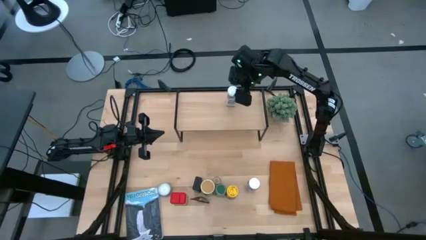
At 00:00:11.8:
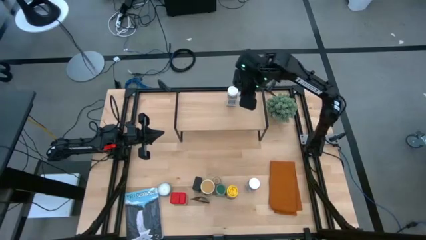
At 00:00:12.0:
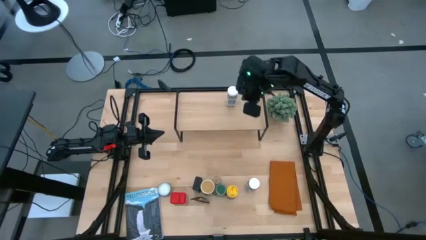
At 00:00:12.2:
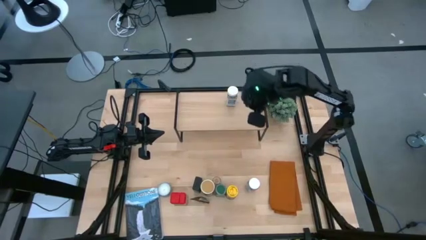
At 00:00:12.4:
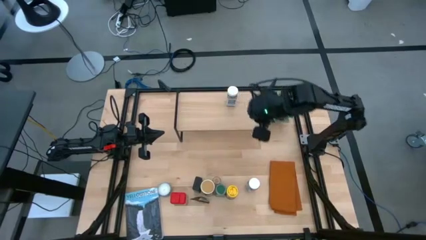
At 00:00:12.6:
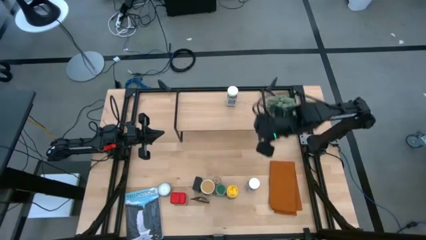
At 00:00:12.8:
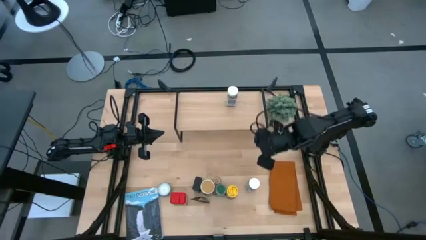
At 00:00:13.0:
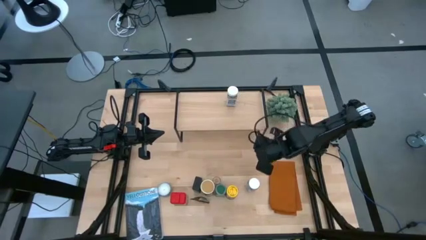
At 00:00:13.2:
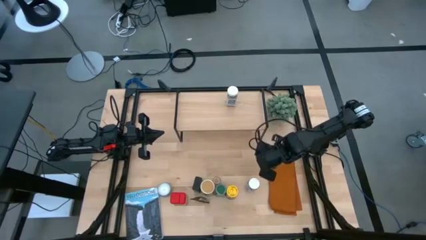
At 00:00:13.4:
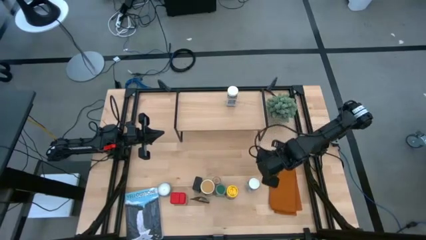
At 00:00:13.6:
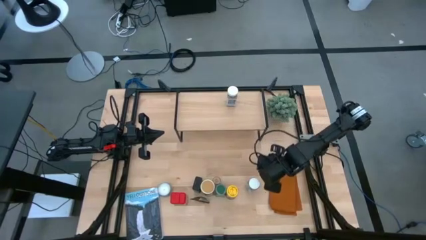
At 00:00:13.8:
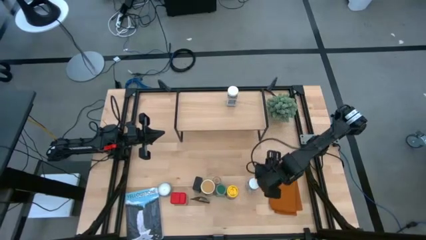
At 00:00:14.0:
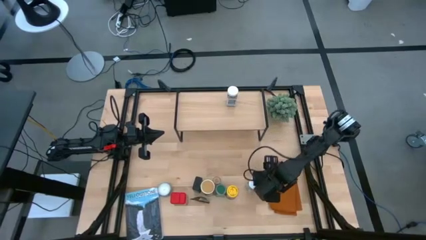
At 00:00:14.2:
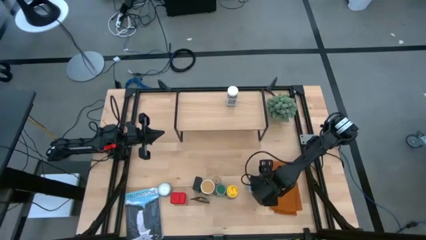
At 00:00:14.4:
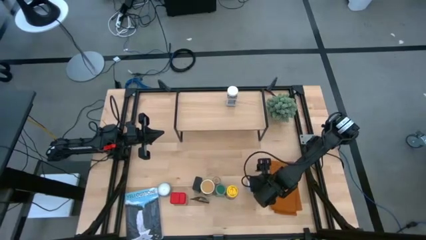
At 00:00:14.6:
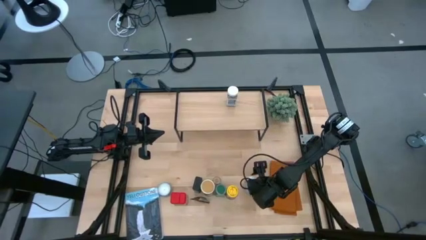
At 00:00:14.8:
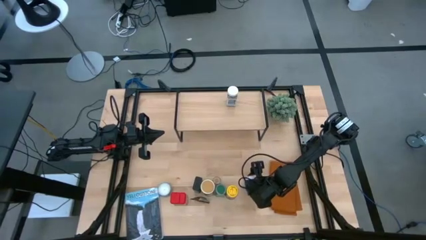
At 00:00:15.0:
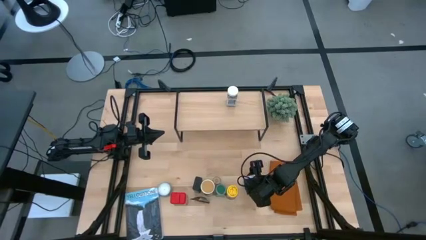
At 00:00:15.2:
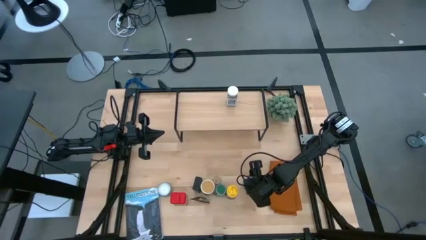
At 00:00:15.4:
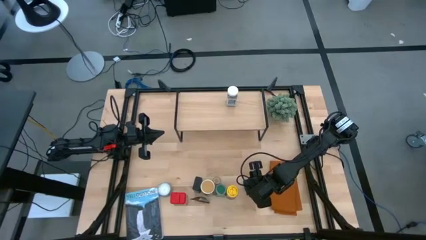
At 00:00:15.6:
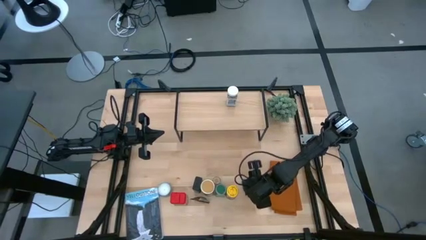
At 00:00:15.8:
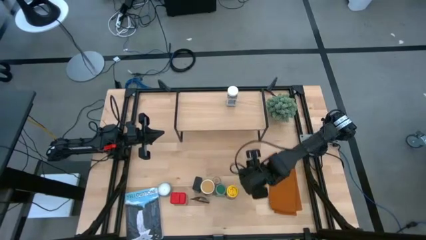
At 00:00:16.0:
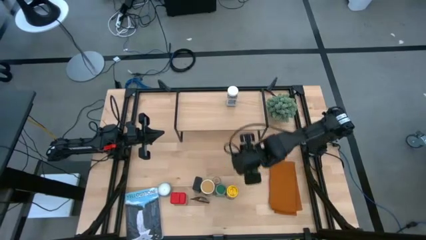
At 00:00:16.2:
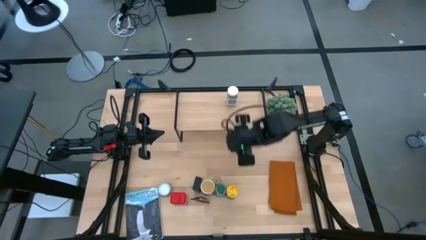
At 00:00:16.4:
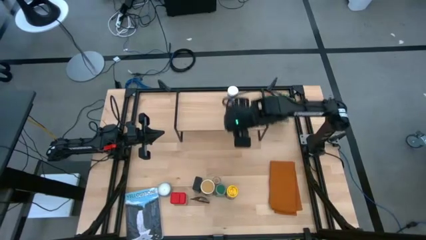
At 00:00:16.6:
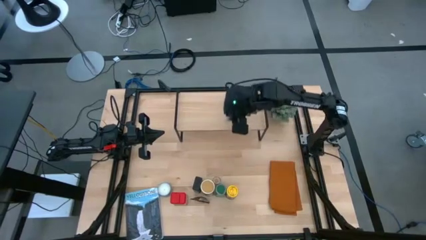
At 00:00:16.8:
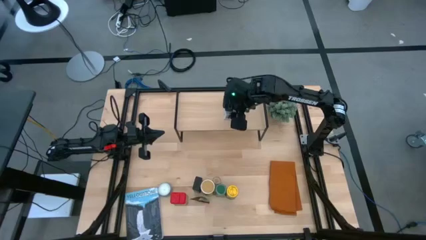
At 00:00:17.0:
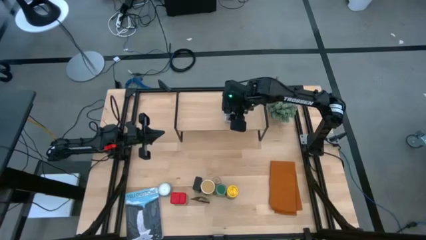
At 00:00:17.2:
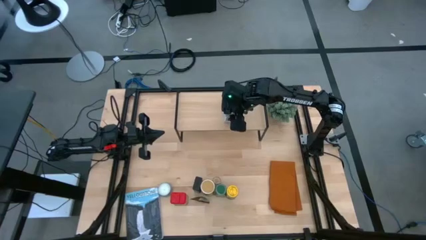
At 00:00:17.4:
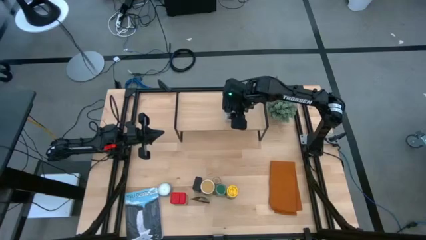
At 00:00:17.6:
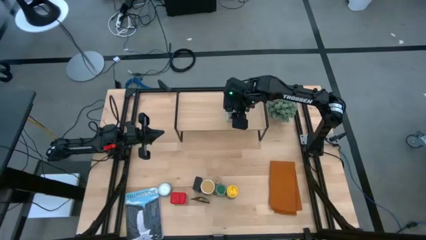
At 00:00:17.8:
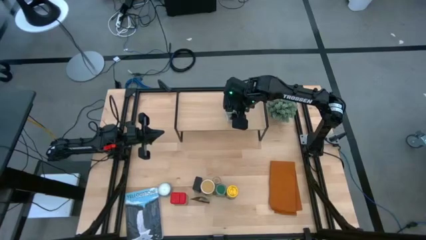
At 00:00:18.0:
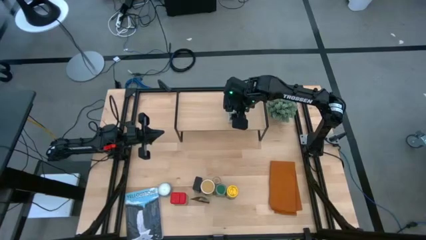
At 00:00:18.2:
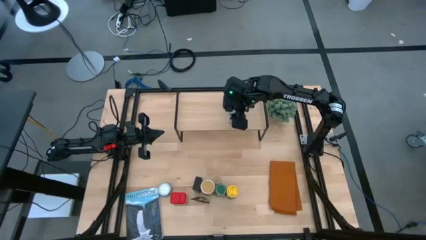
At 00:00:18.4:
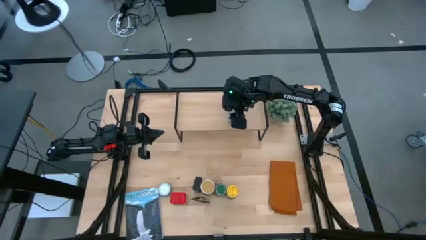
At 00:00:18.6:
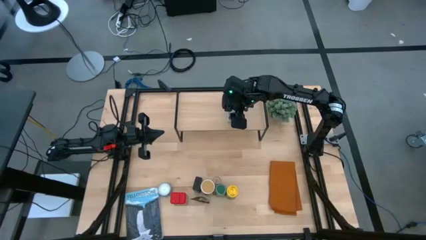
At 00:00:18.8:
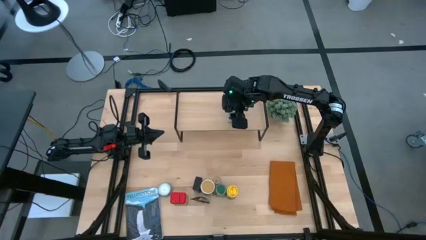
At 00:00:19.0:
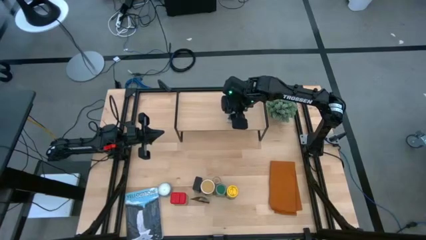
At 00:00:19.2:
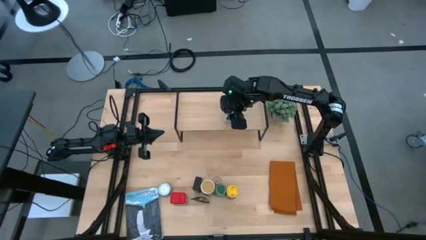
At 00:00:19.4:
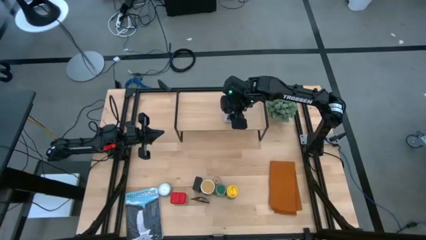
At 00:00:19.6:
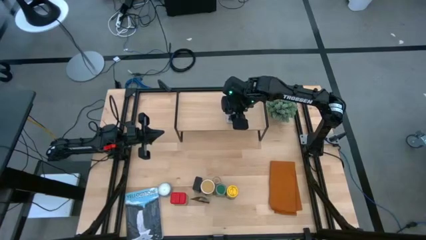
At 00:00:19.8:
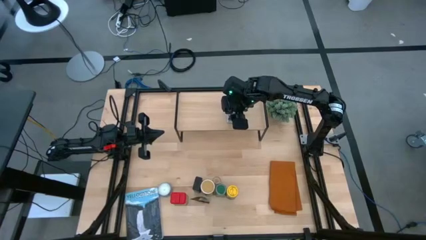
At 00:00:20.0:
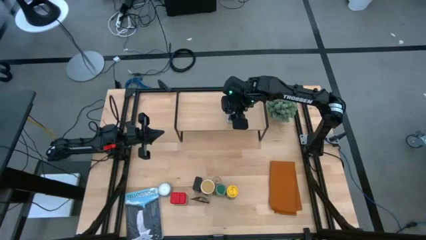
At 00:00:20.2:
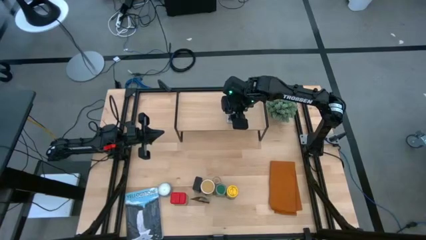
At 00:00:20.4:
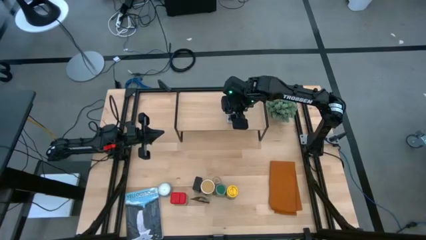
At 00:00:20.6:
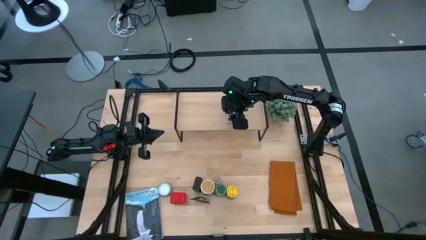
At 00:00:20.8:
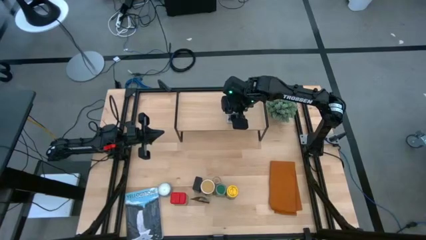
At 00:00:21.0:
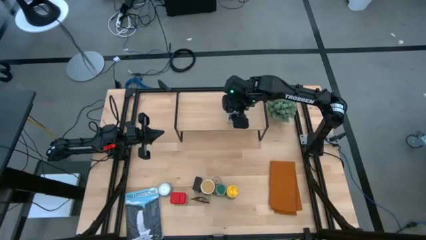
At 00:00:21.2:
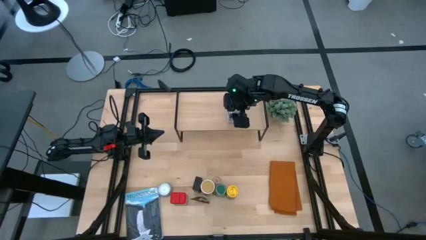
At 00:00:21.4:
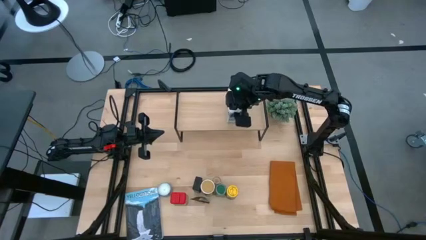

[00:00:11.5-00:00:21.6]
Task: Shelf spices
Put the white seasoning bottle on the shelf
